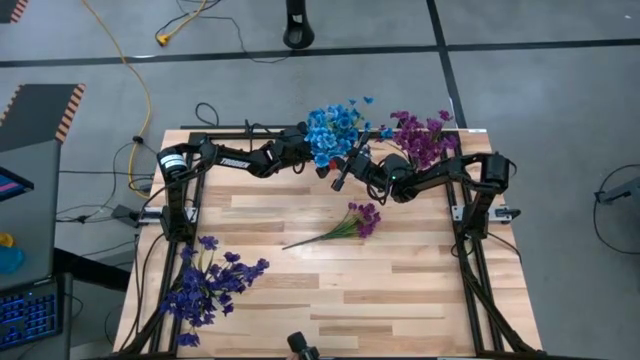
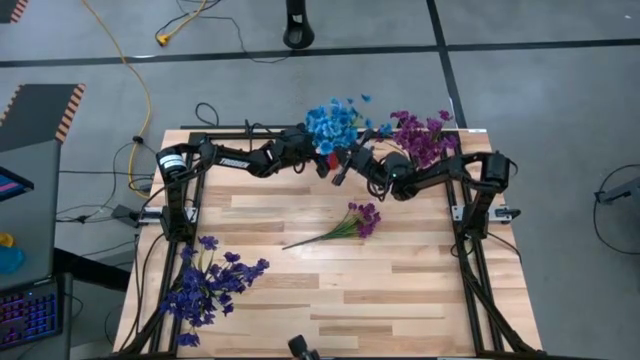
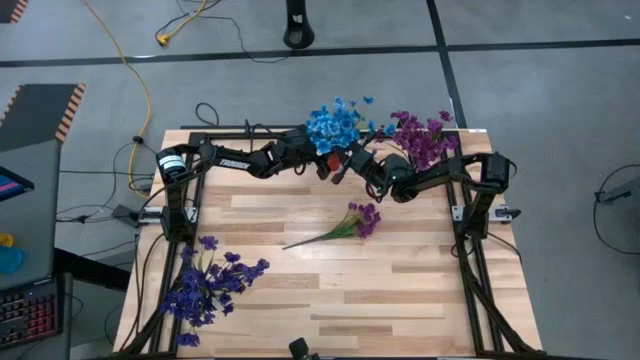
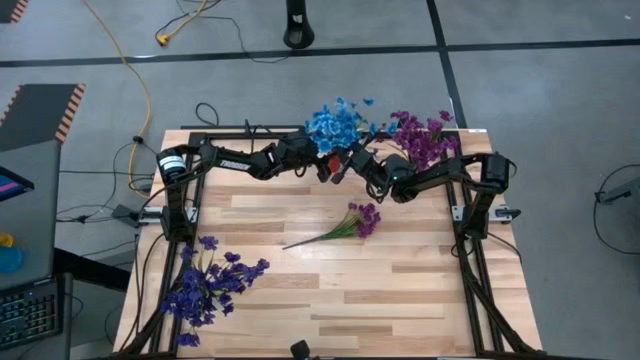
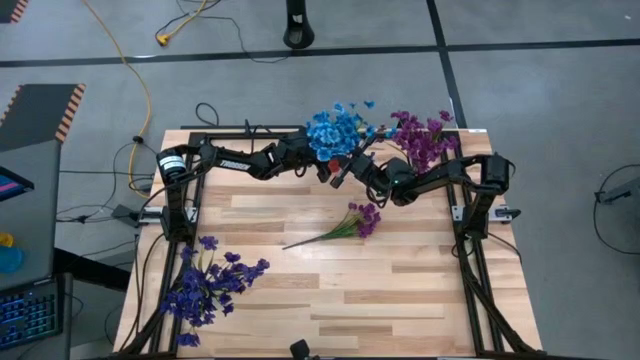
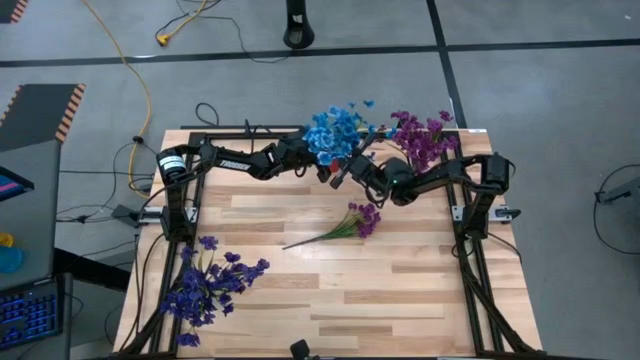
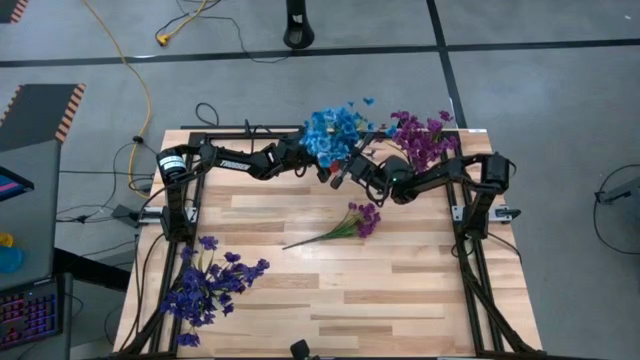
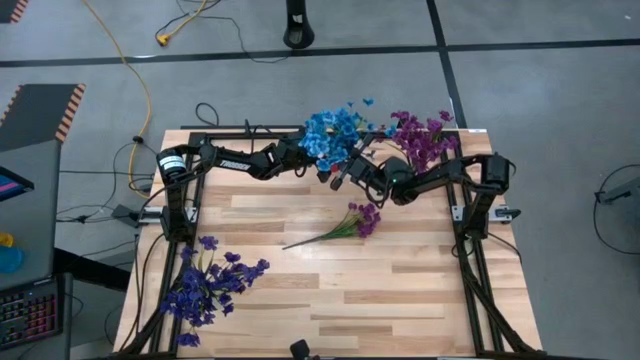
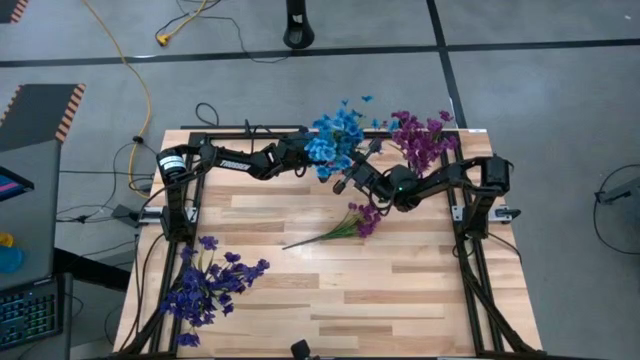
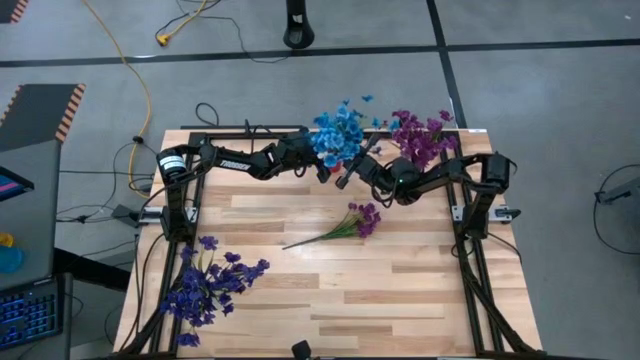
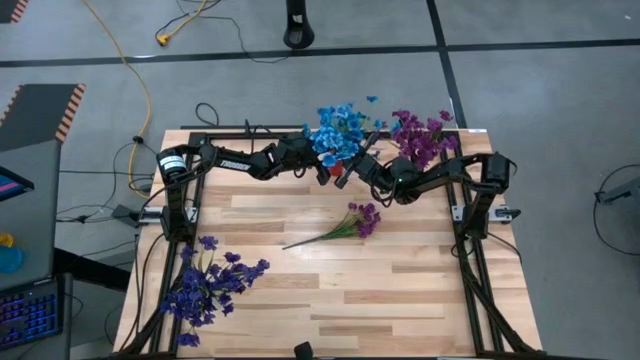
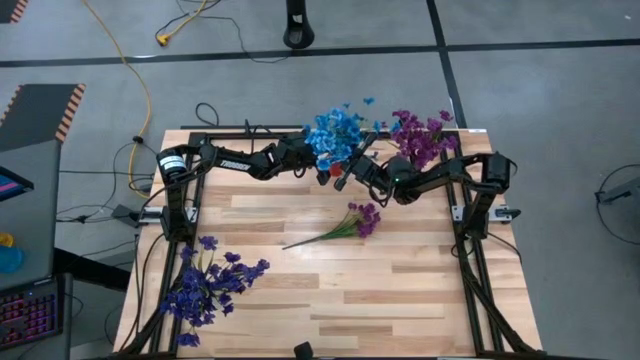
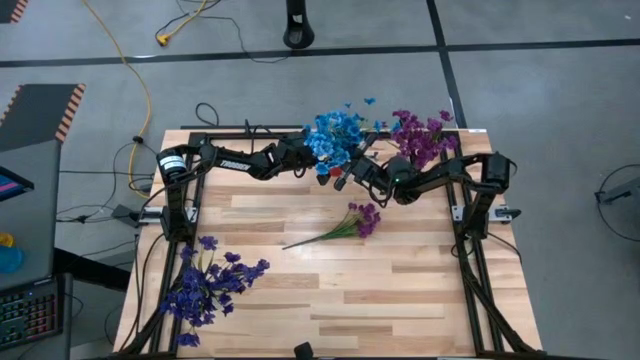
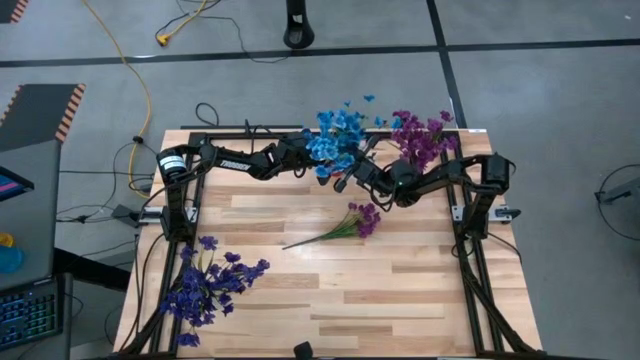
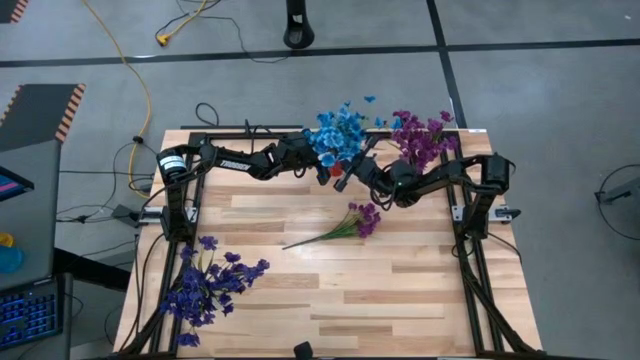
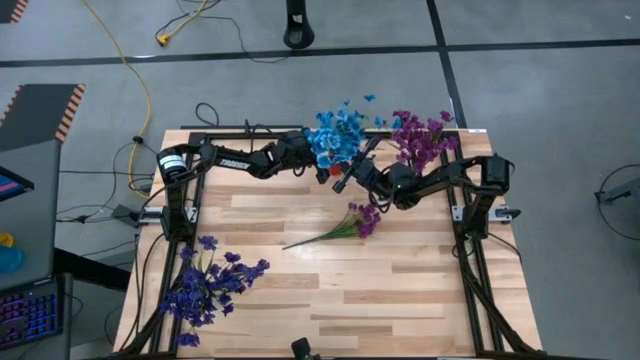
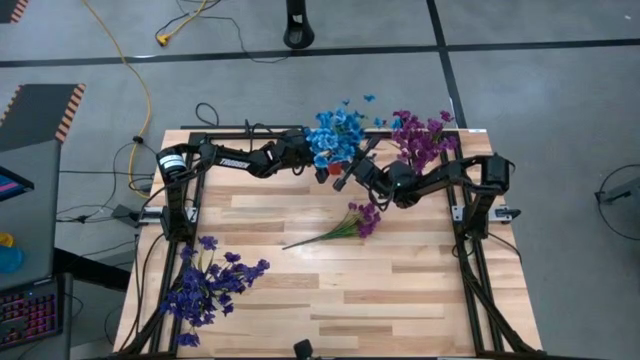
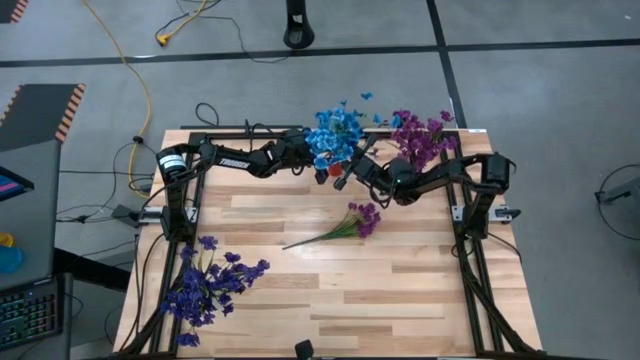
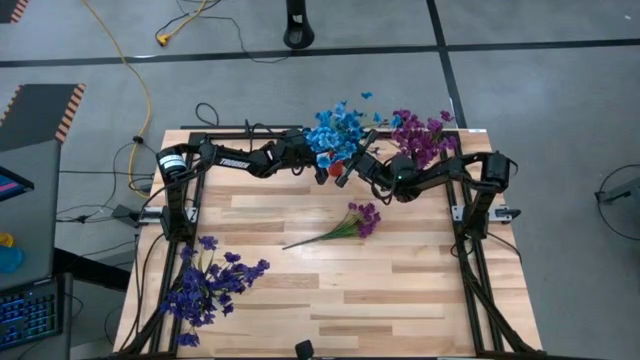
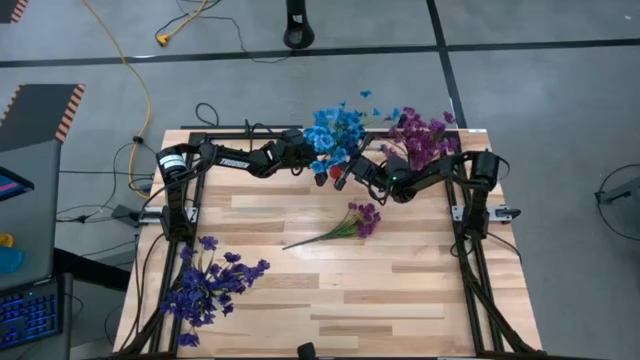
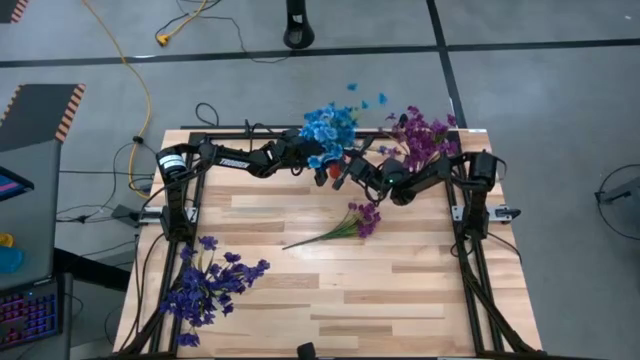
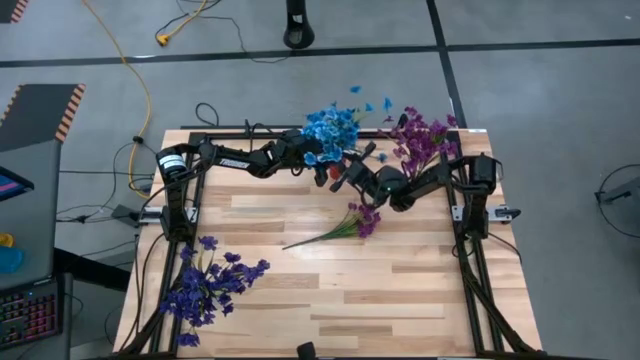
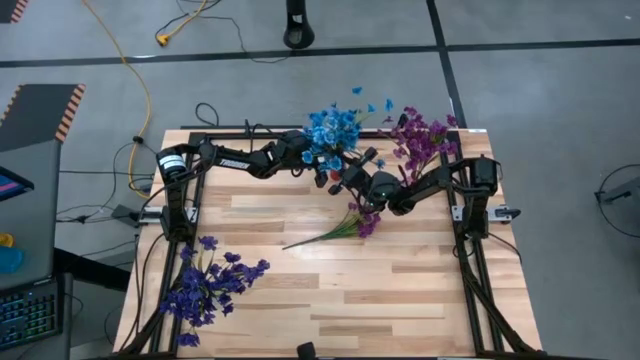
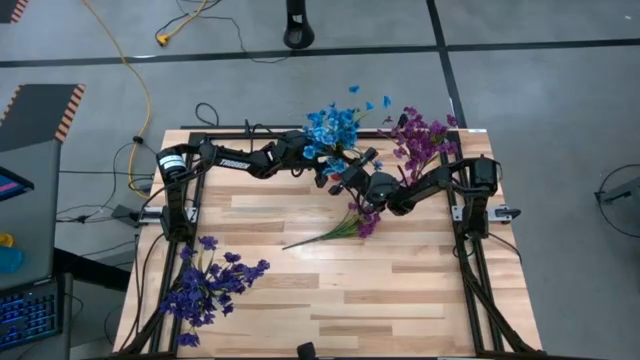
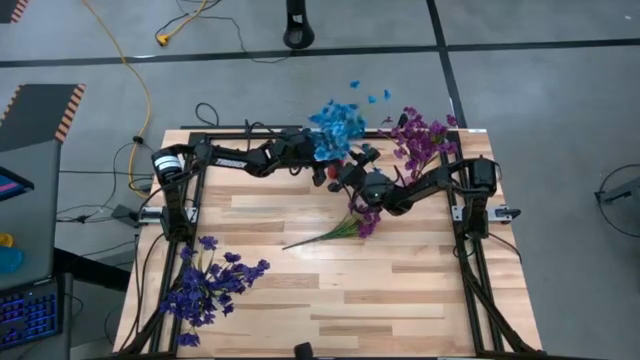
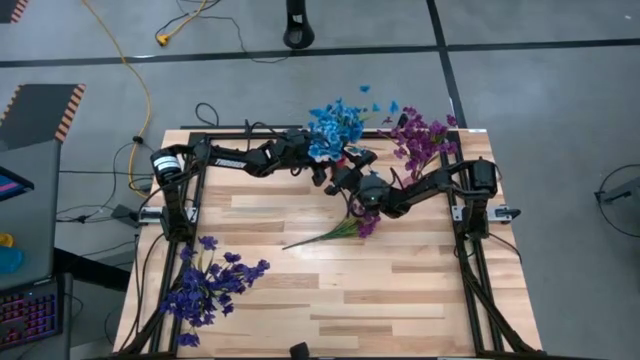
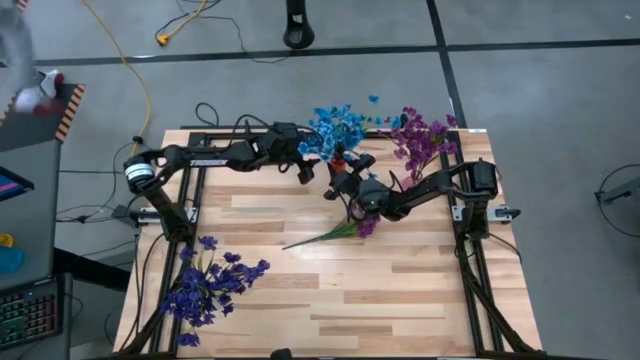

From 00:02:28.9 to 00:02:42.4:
Task: Sort flowers into vase by color
Put the blue flowers into the red vase

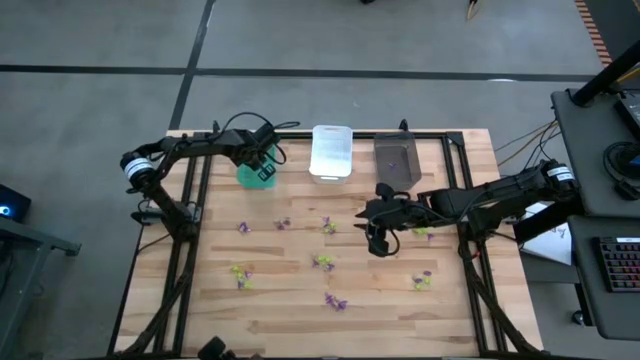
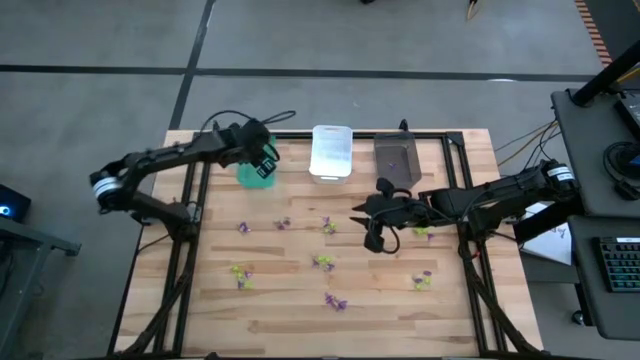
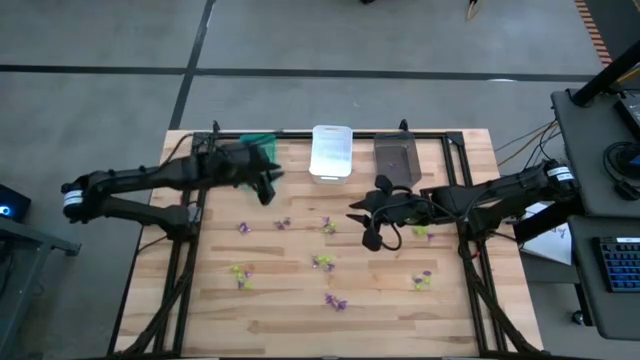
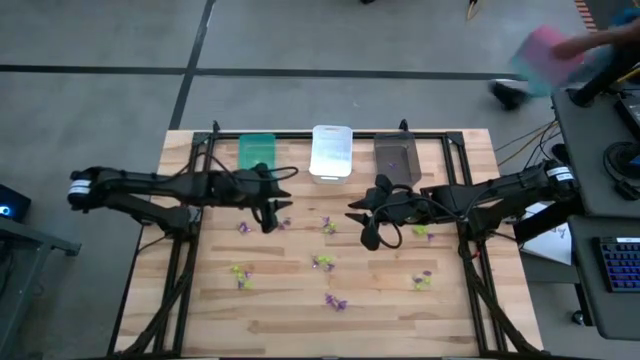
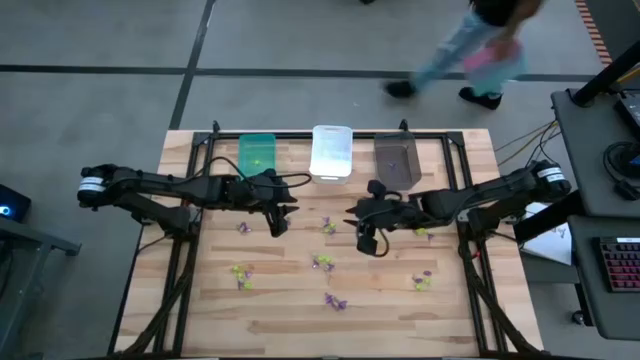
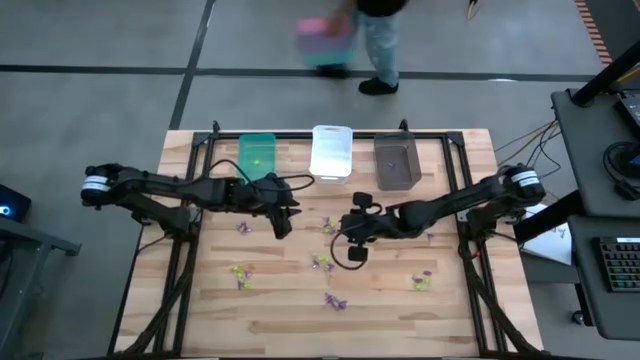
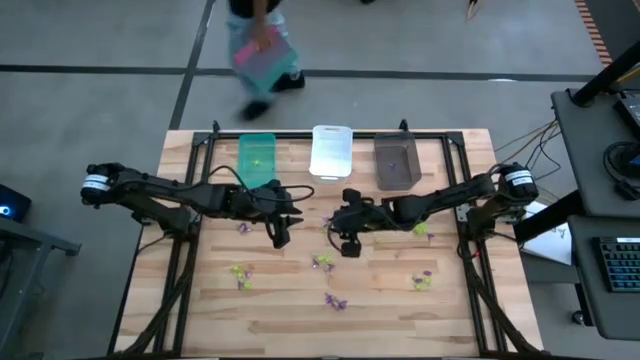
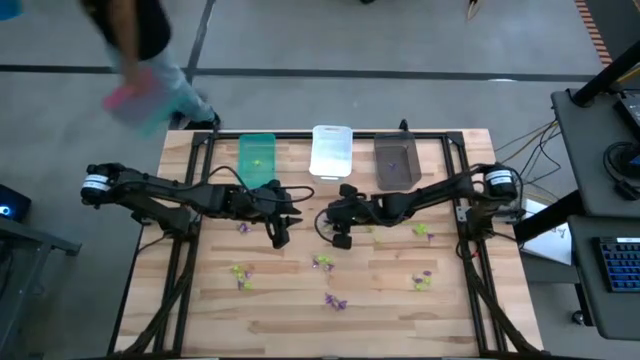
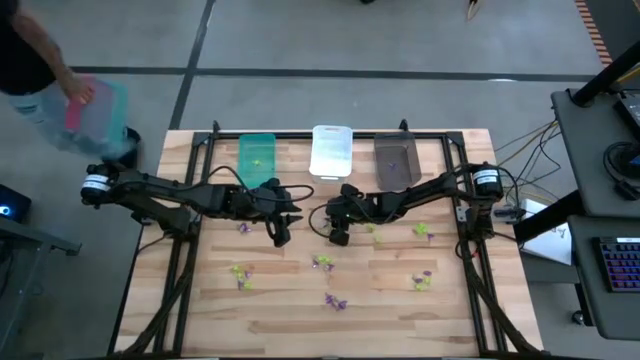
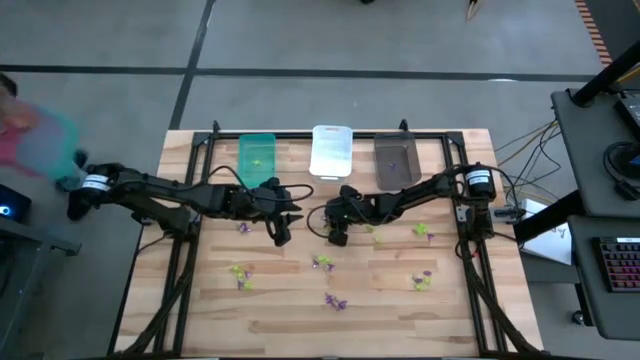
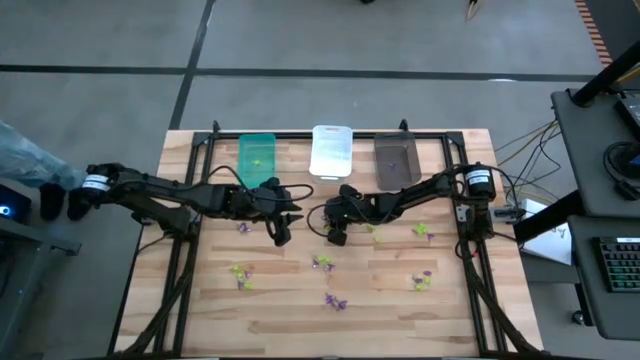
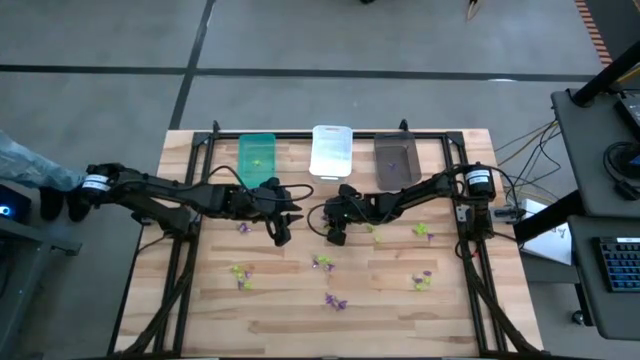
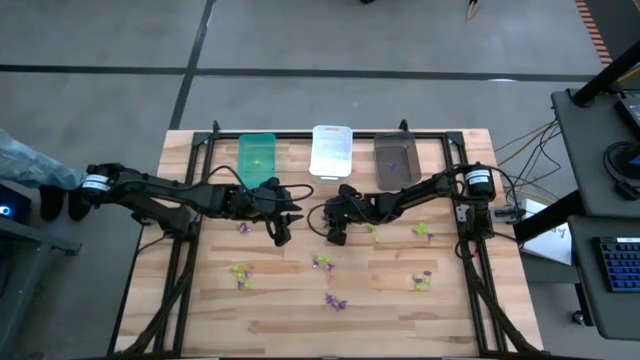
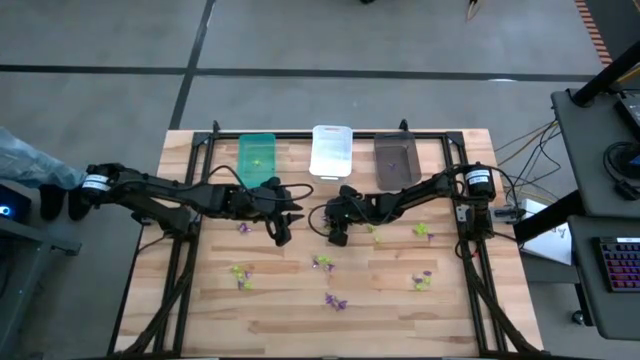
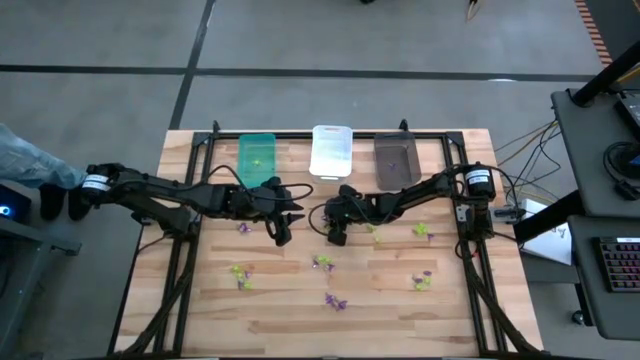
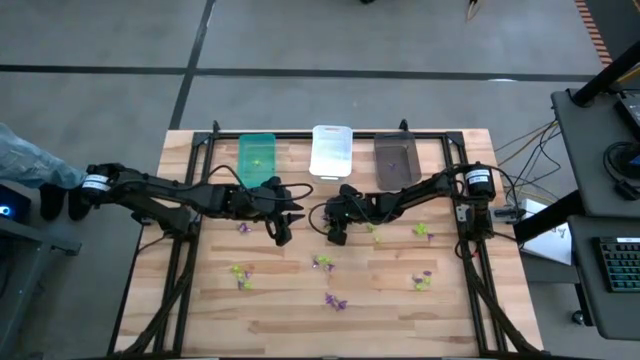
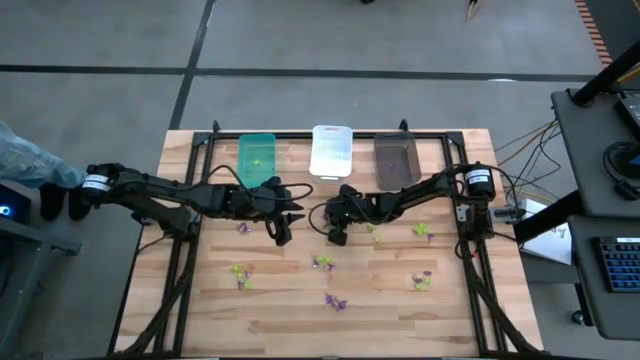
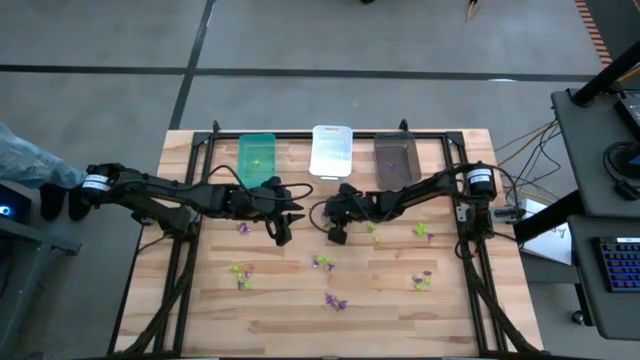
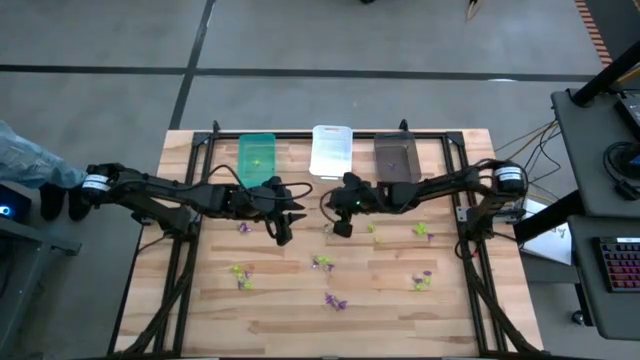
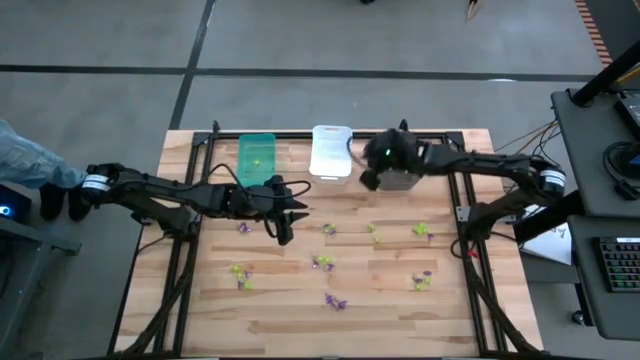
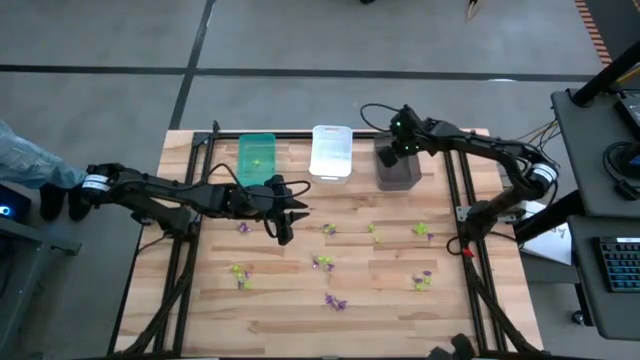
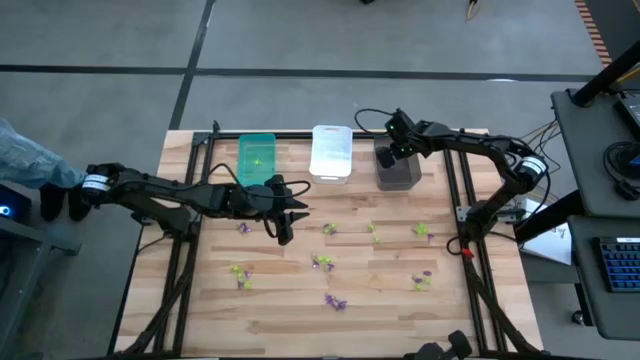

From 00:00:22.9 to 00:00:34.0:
Task: Sort Halloween decoration
Put the purple witch hat toy into the gray bin
